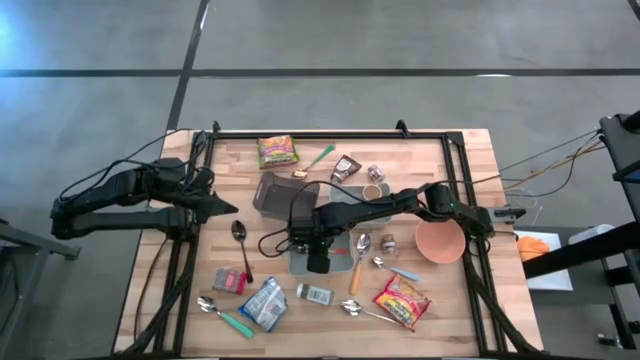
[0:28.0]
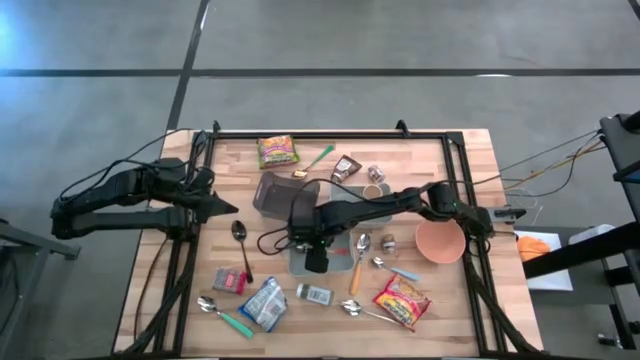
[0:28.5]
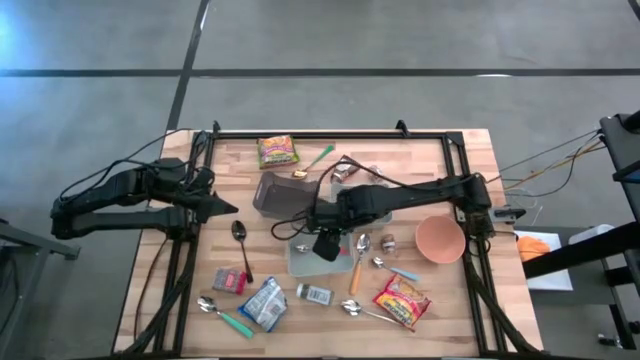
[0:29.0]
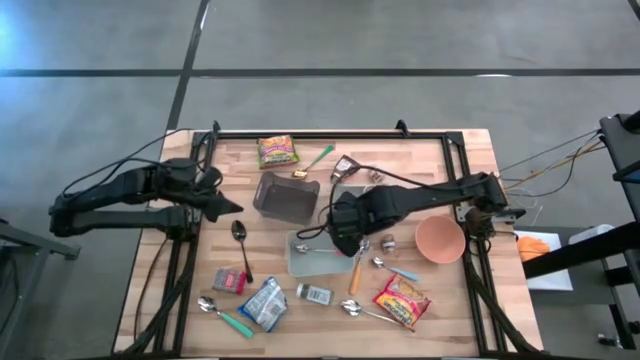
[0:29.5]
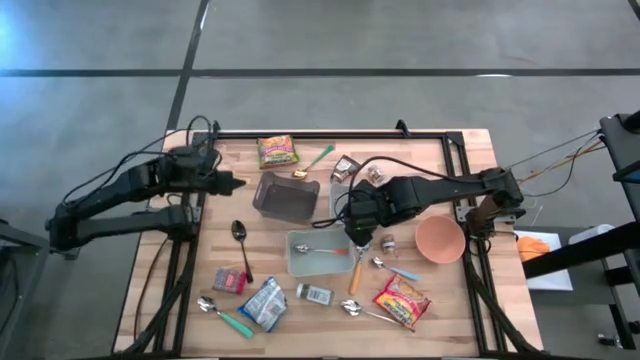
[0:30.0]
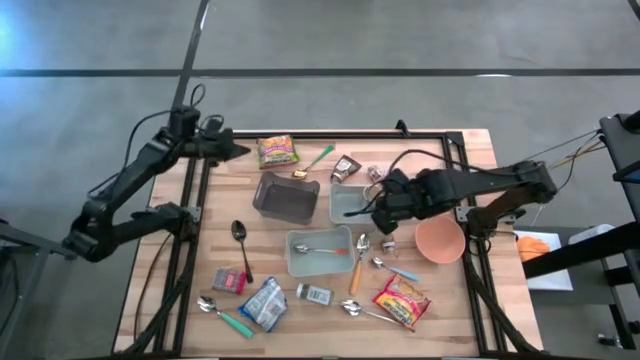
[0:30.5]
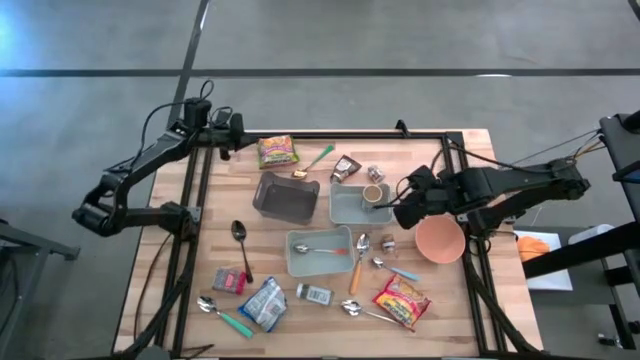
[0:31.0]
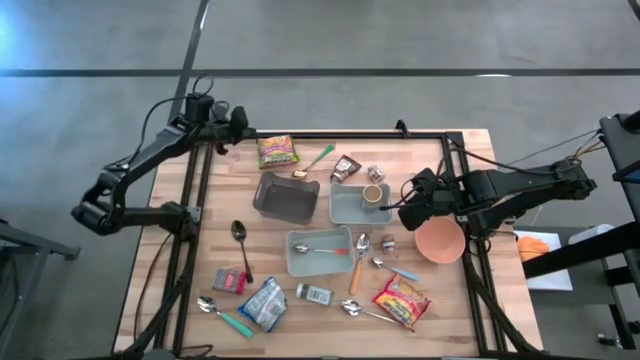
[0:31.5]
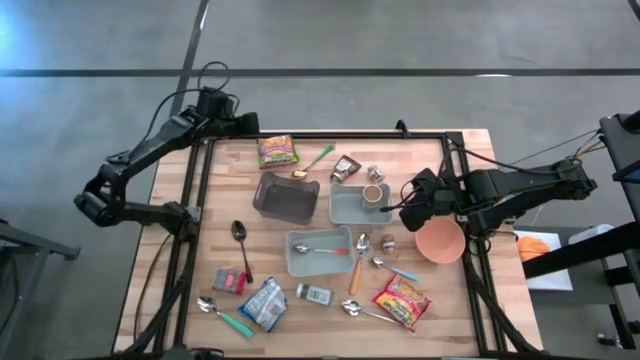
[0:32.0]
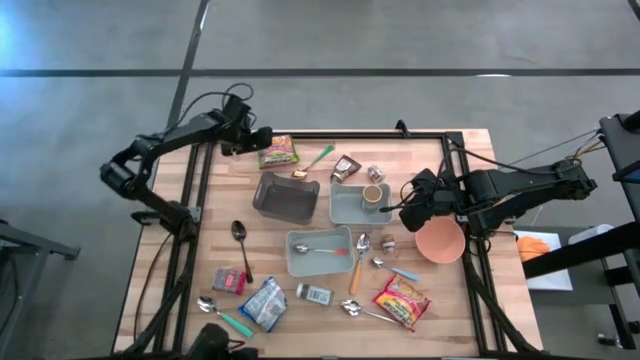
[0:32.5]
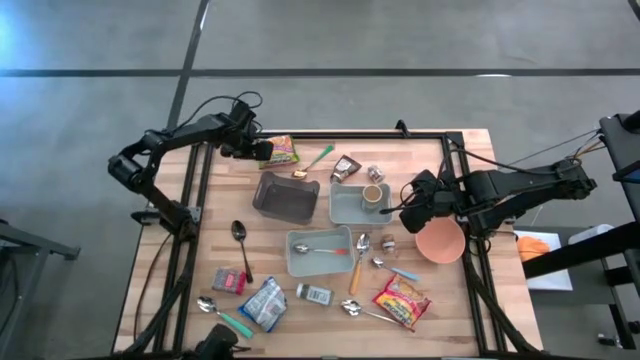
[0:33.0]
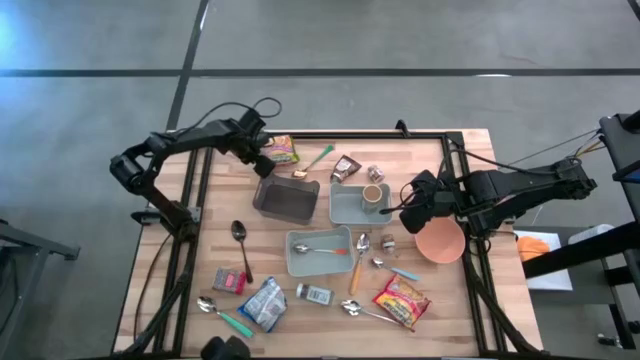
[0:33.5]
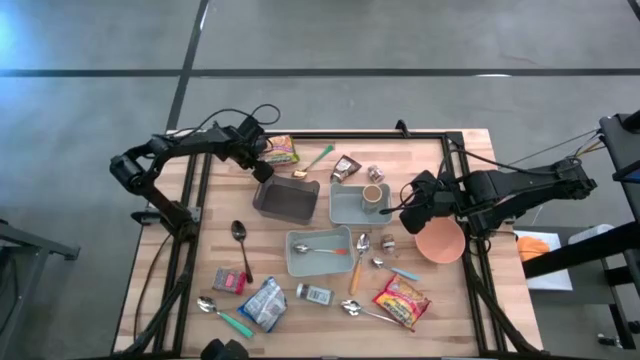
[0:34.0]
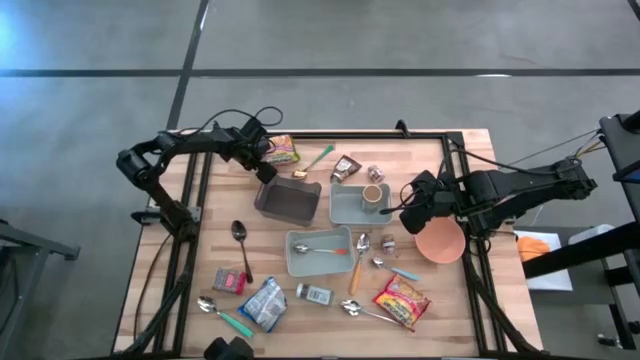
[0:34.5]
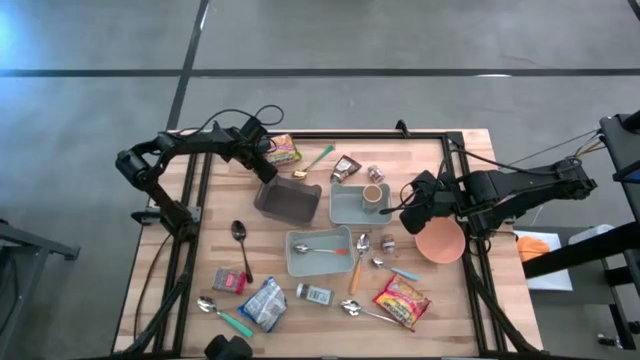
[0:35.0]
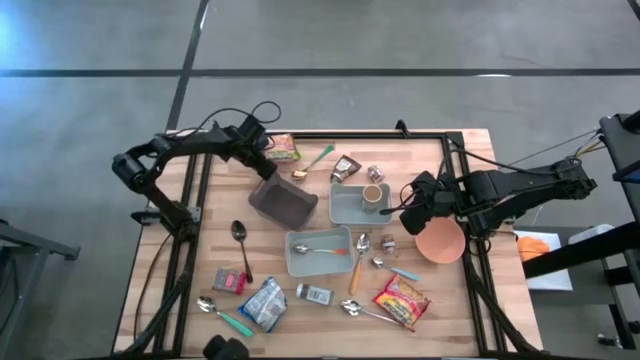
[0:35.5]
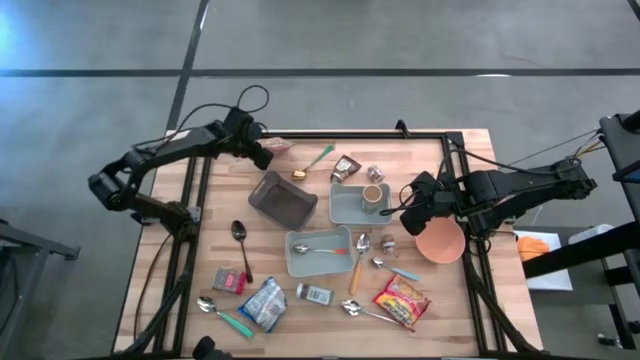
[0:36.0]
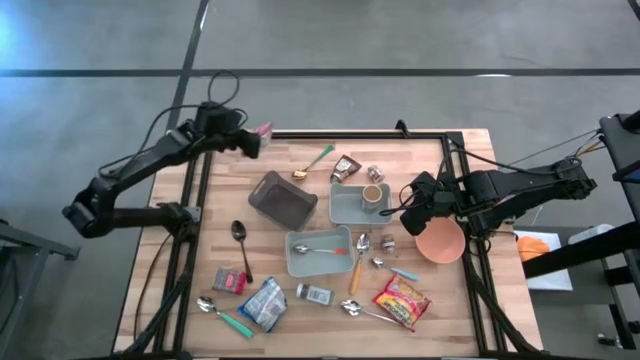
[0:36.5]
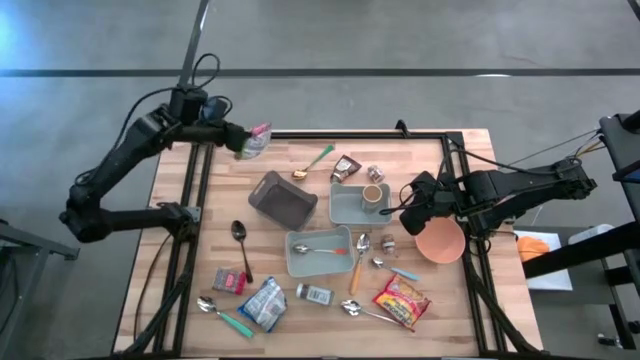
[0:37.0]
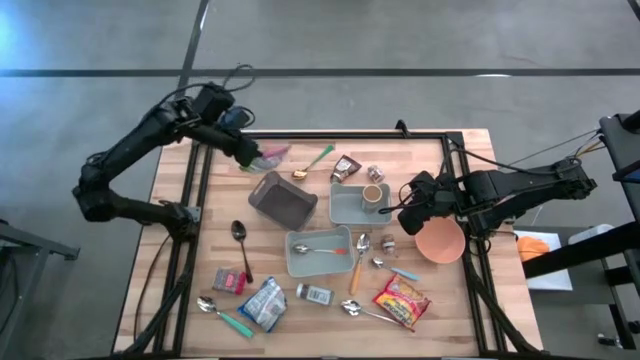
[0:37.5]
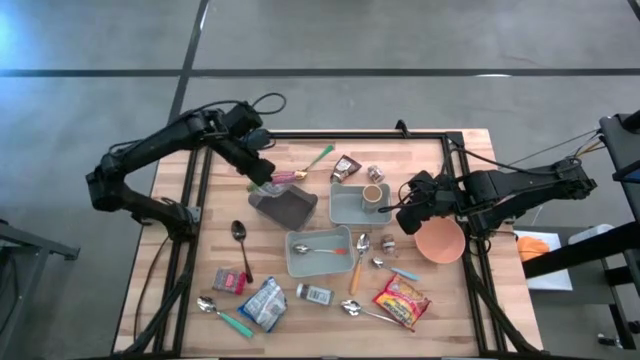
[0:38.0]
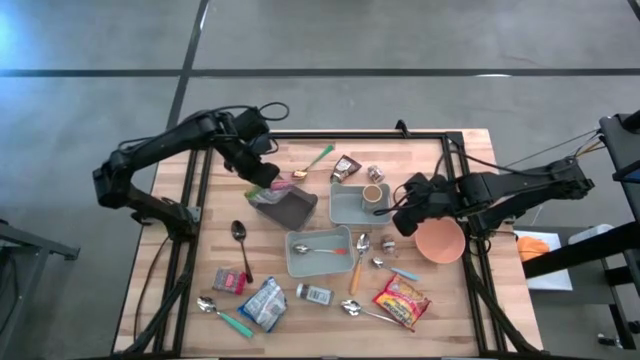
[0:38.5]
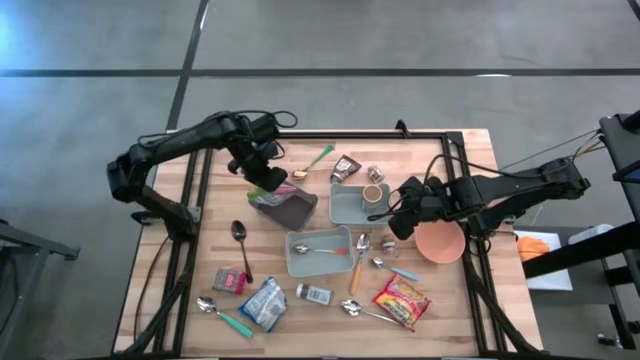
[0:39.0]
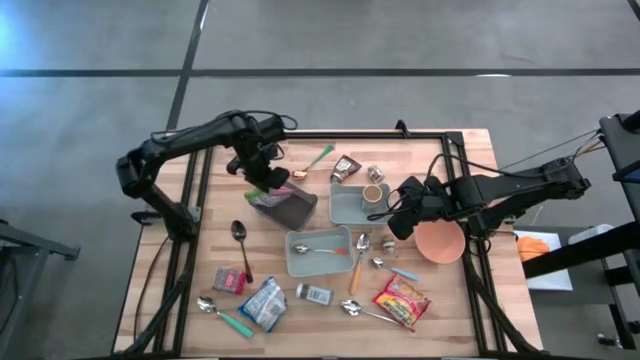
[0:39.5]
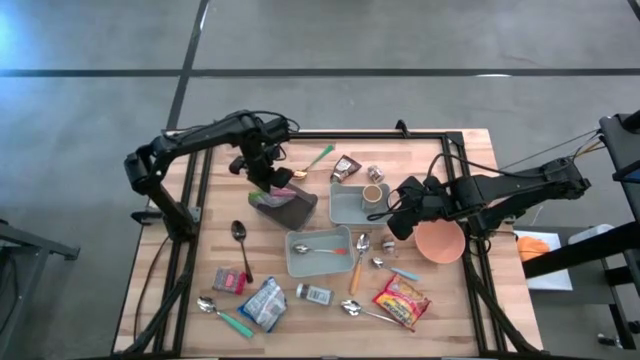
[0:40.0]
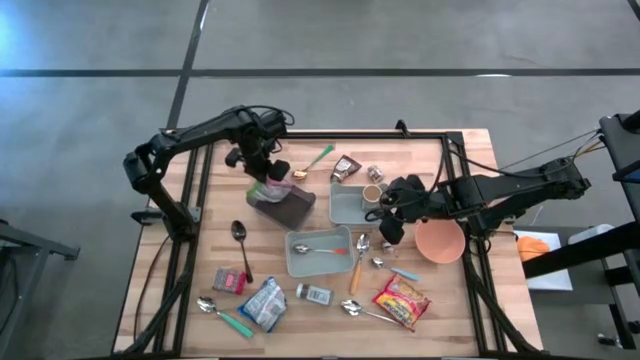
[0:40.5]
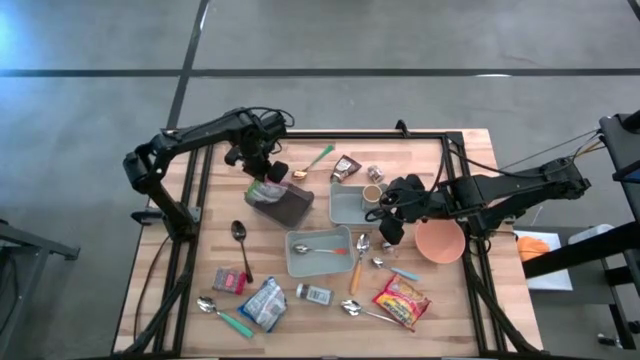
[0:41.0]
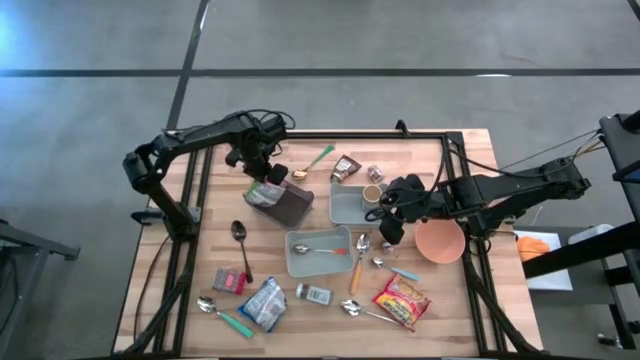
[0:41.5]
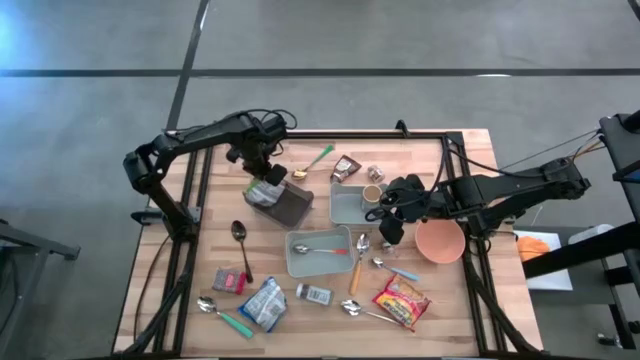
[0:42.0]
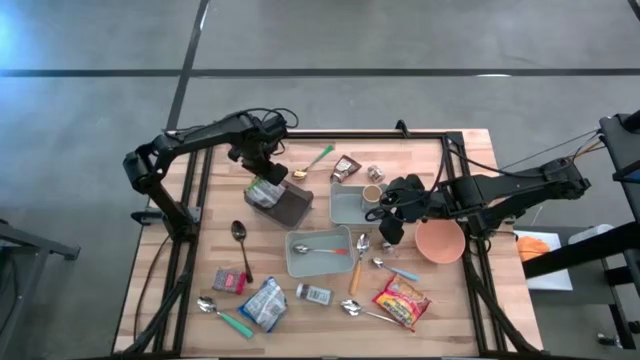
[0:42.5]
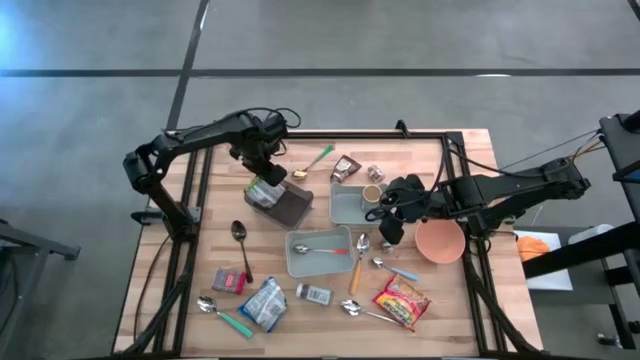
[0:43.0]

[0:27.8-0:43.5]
Put the green noodle pack into the black bin

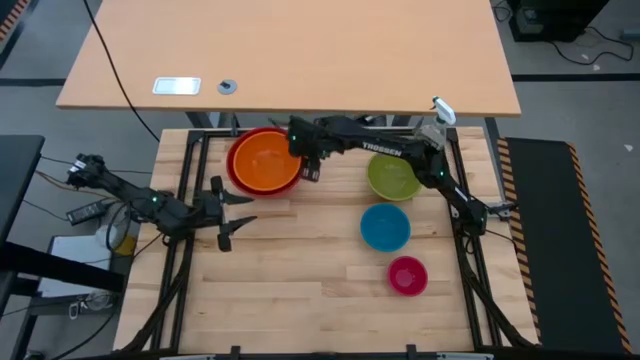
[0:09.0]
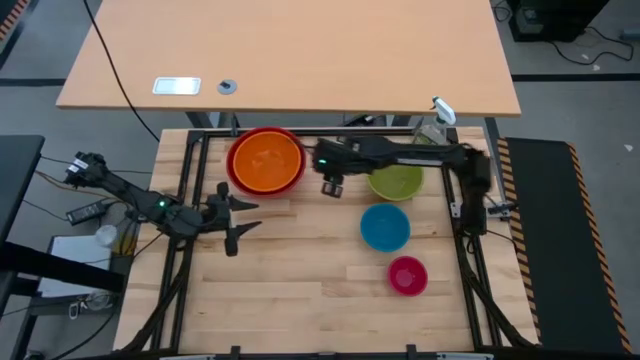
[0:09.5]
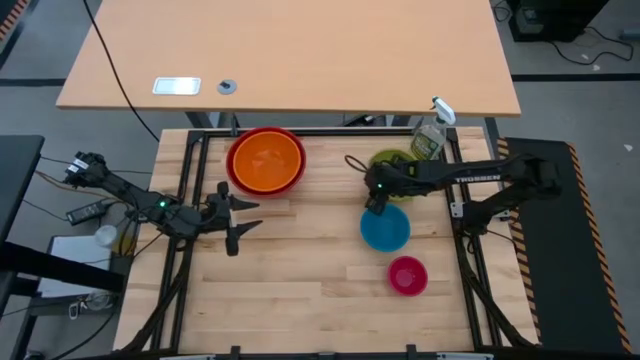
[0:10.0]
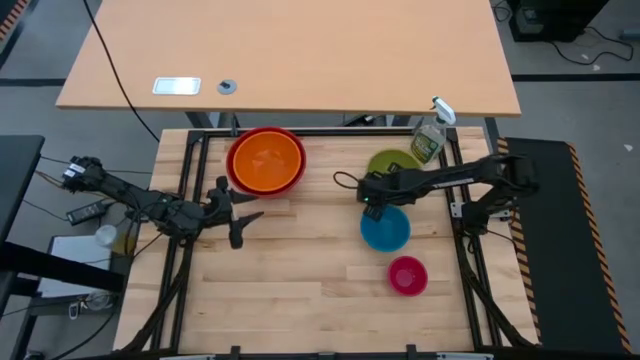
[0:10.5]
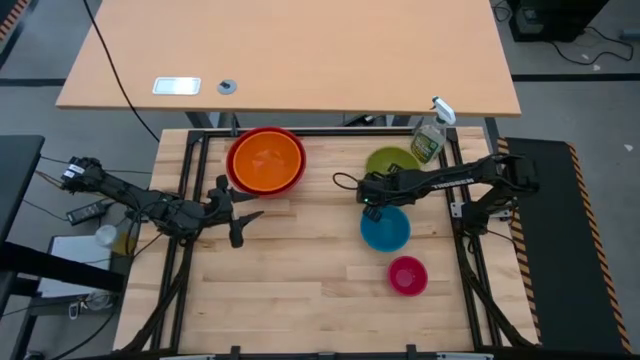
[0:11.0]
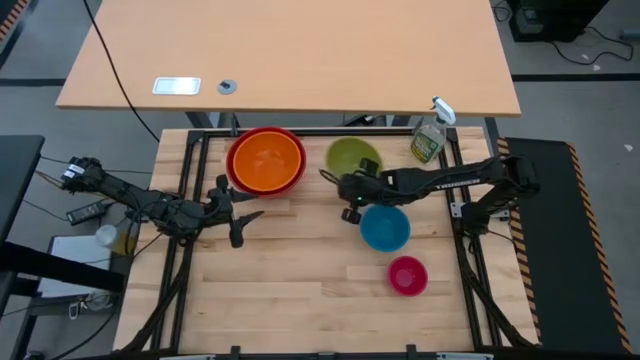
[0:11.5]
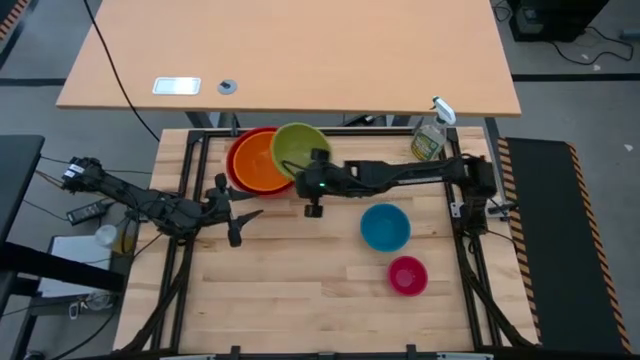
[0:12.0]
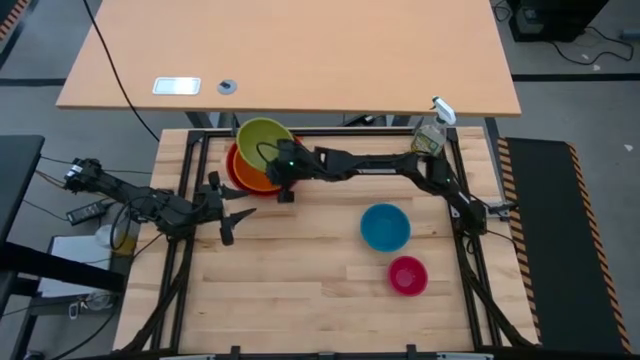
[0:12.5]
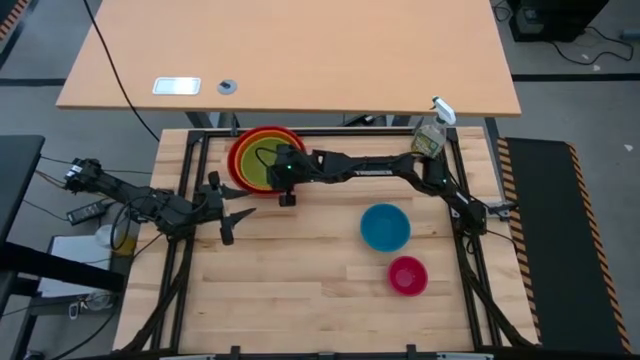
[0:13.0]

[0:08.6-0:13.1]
Stack the medium green bowl on top of the large orange bowl

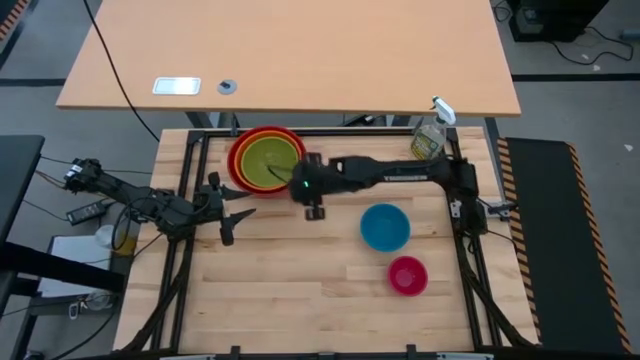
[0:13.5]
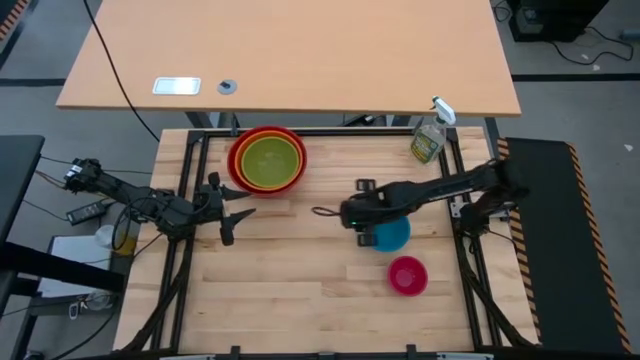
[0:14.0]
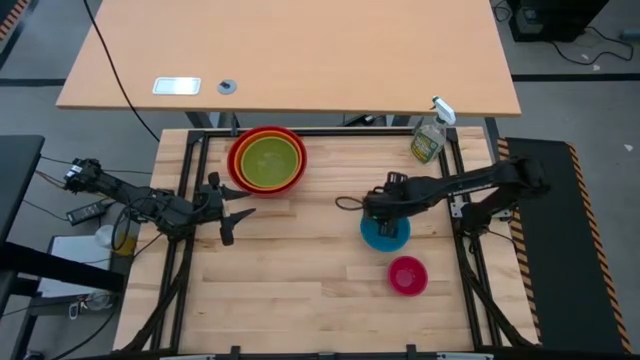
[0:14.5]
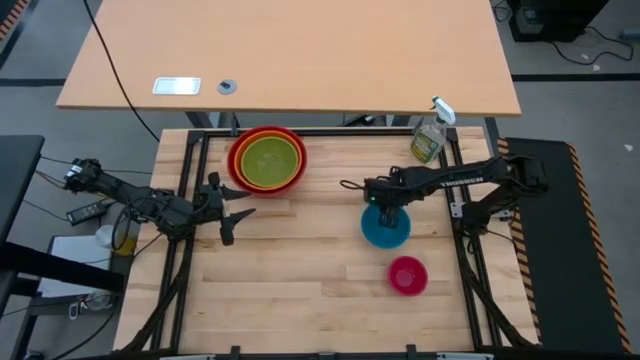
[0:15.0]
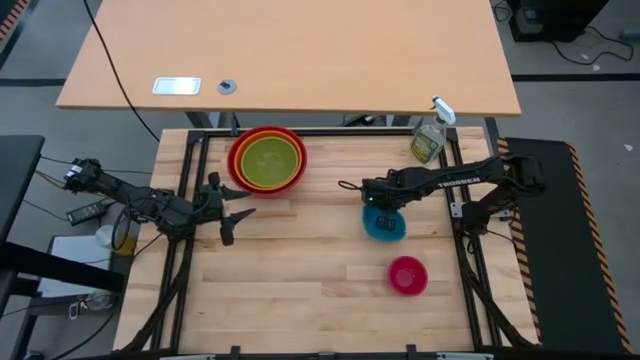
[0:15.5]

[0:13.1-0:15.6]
Stack the small blue bowl on top of the medium green bowl
